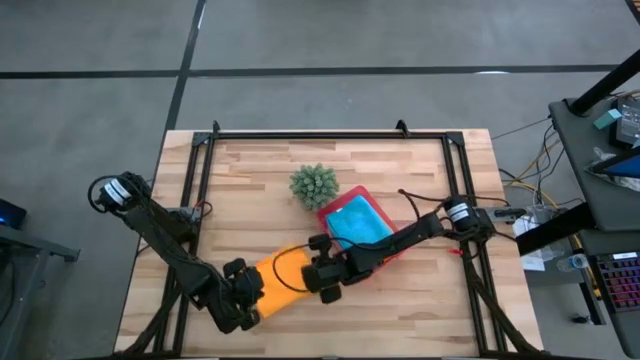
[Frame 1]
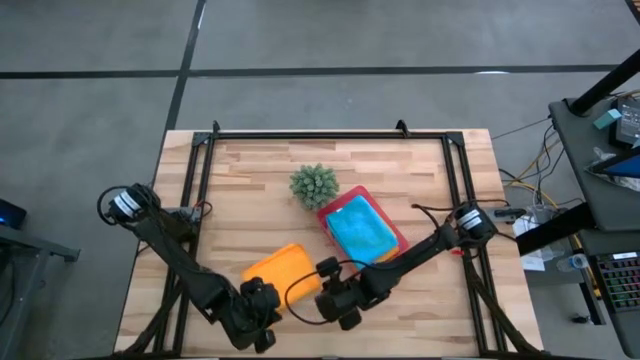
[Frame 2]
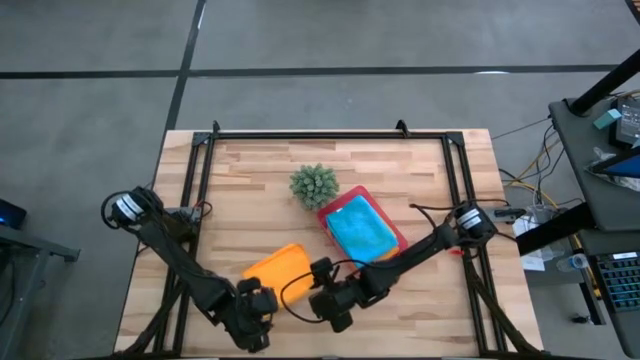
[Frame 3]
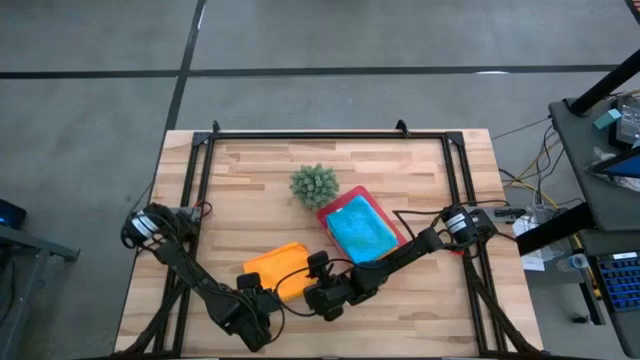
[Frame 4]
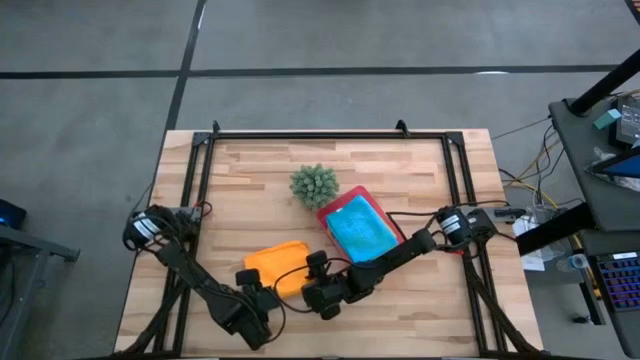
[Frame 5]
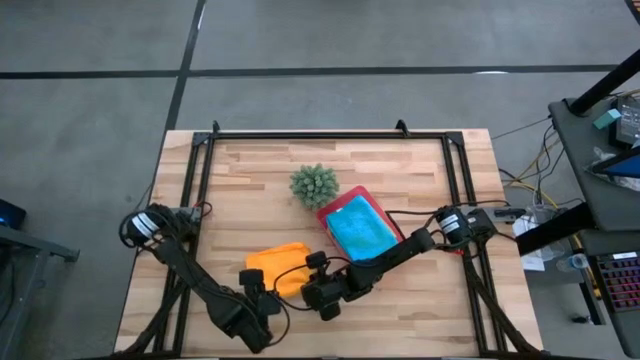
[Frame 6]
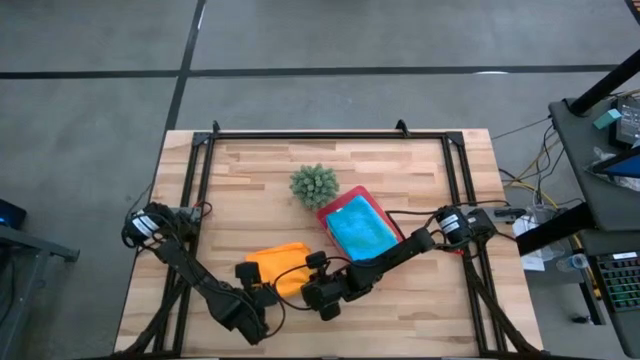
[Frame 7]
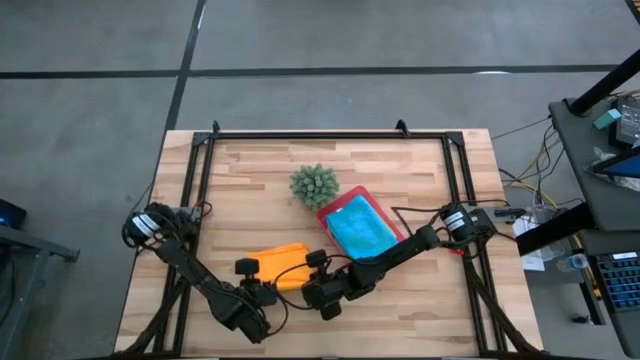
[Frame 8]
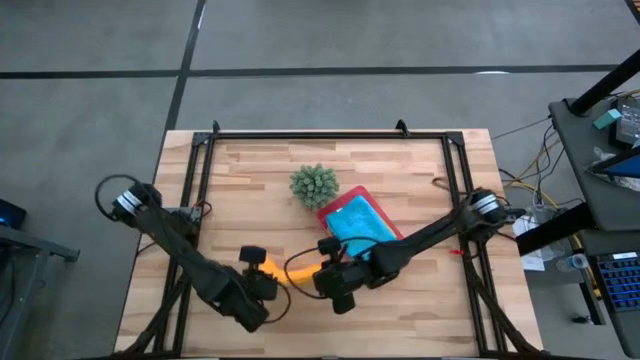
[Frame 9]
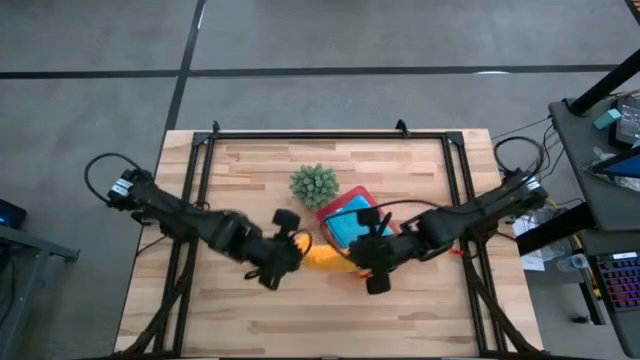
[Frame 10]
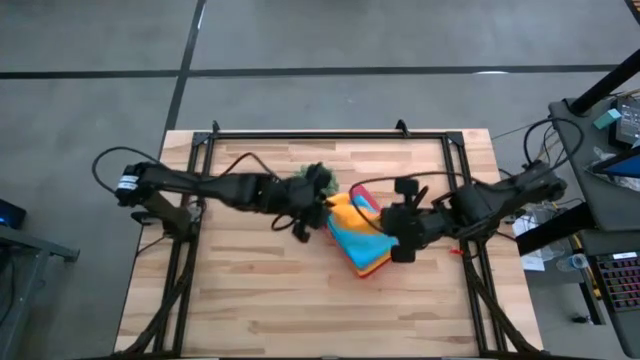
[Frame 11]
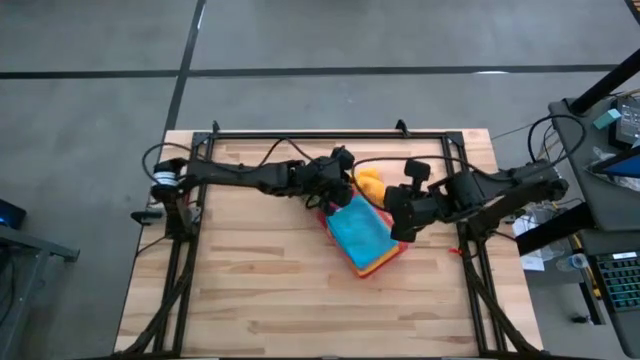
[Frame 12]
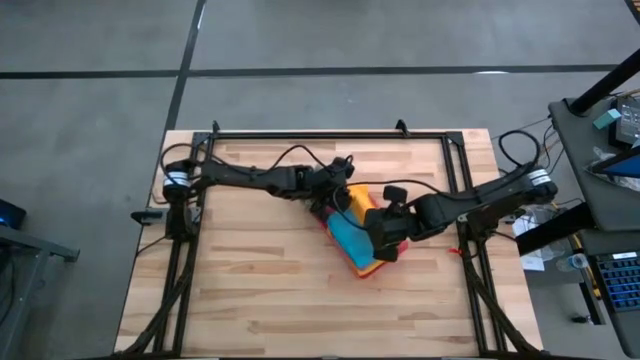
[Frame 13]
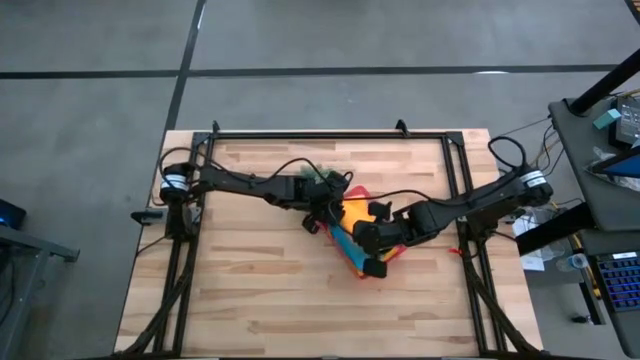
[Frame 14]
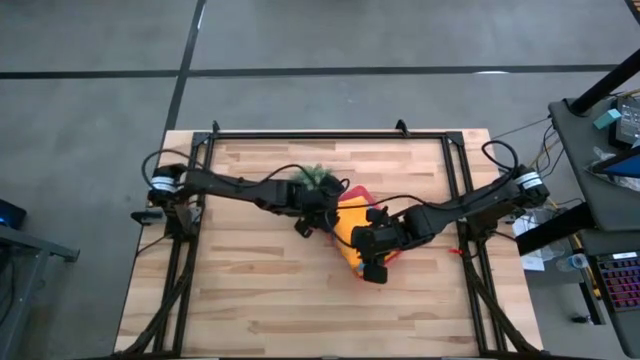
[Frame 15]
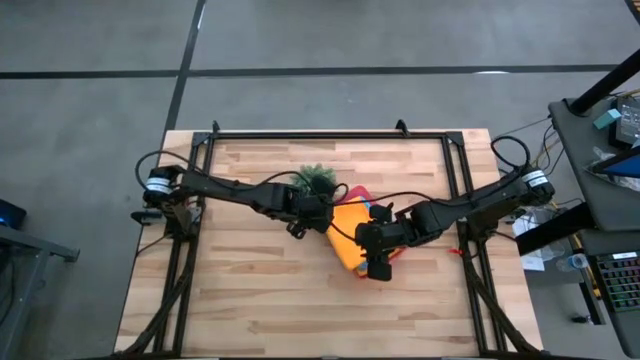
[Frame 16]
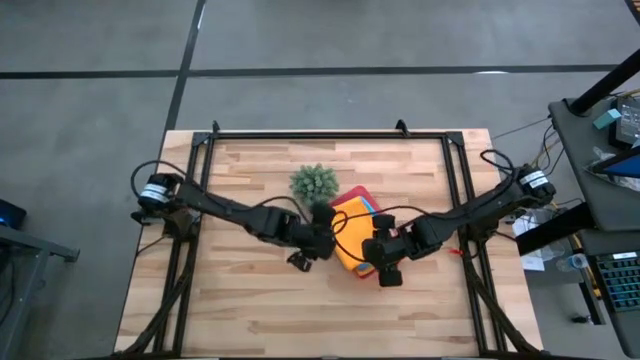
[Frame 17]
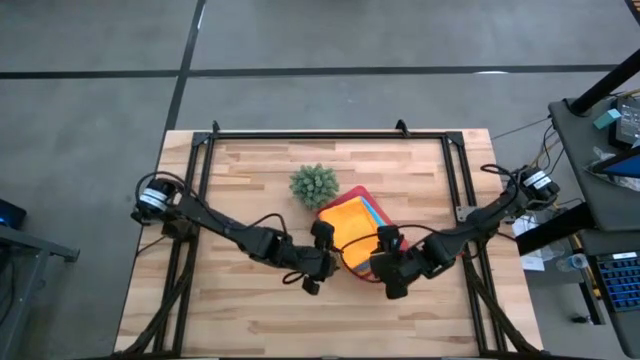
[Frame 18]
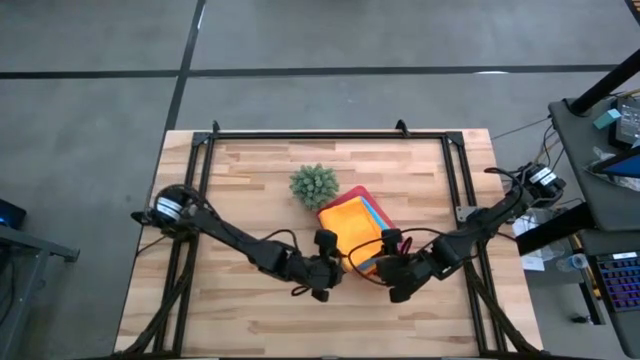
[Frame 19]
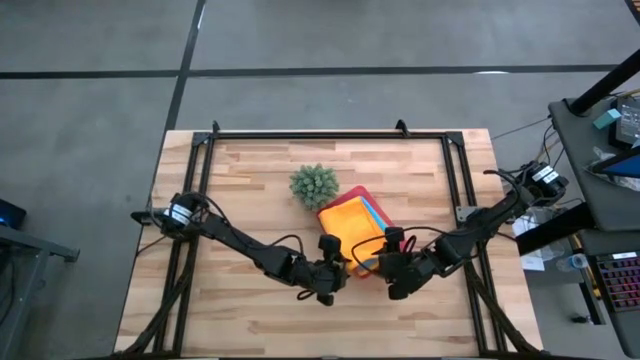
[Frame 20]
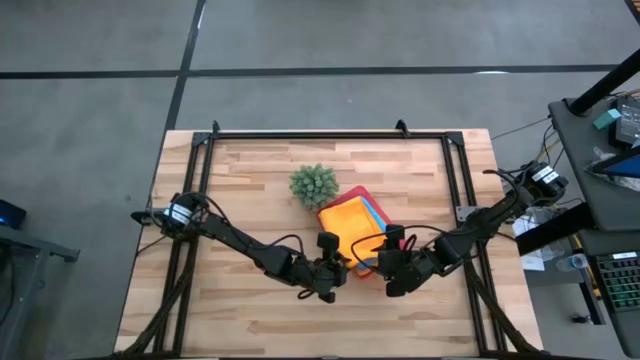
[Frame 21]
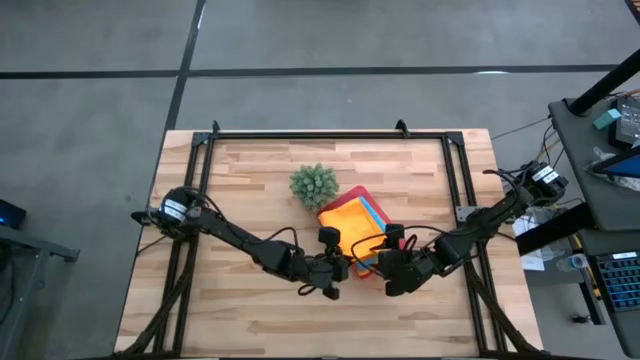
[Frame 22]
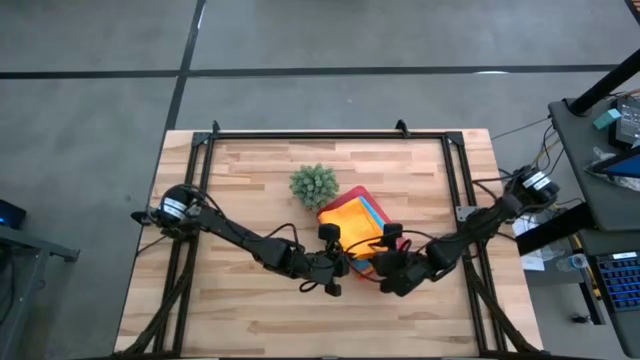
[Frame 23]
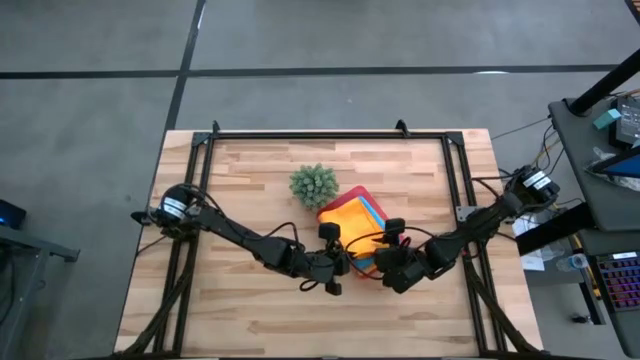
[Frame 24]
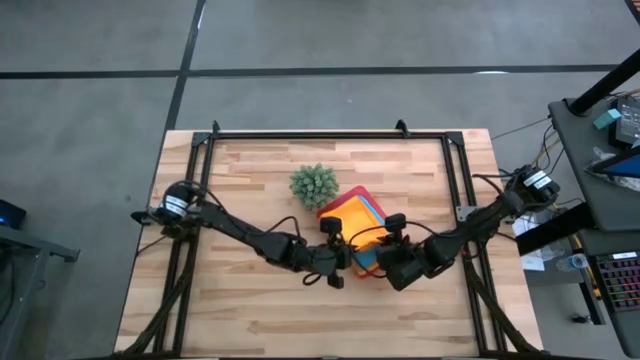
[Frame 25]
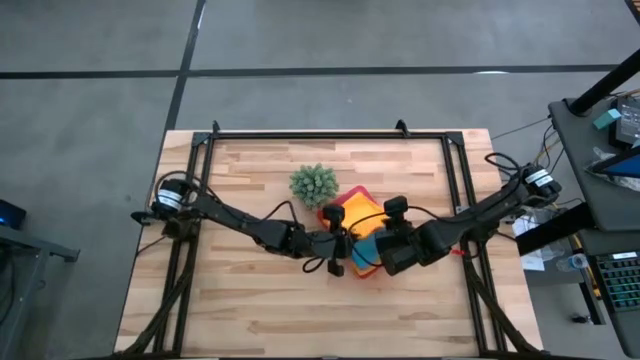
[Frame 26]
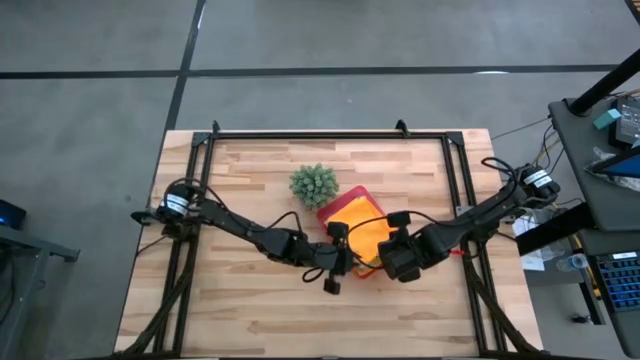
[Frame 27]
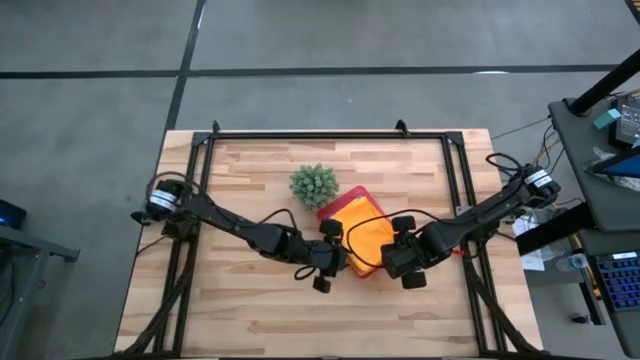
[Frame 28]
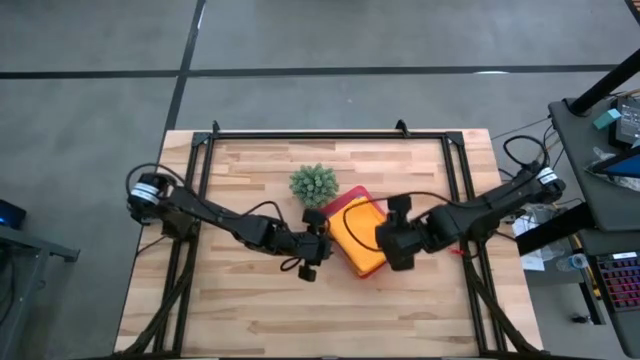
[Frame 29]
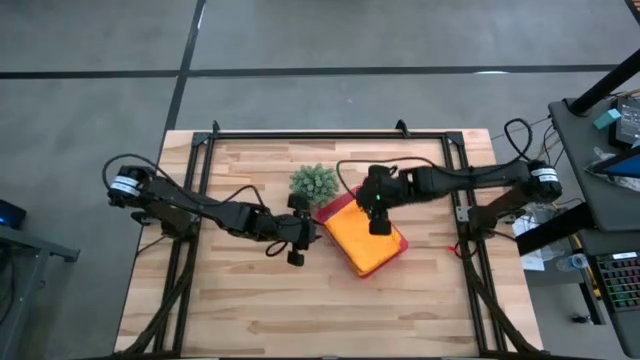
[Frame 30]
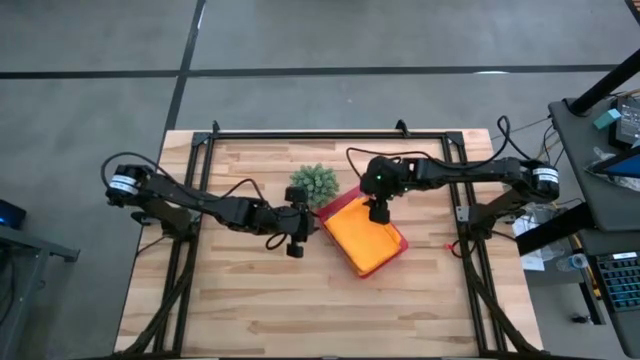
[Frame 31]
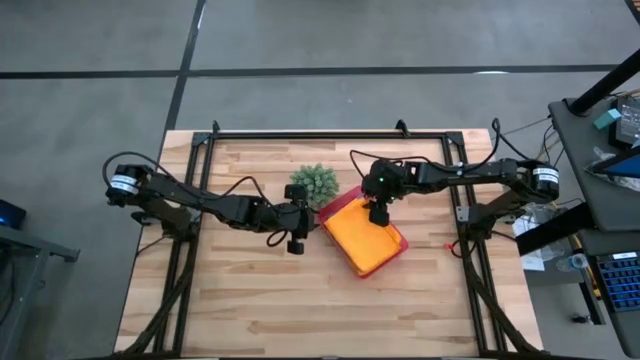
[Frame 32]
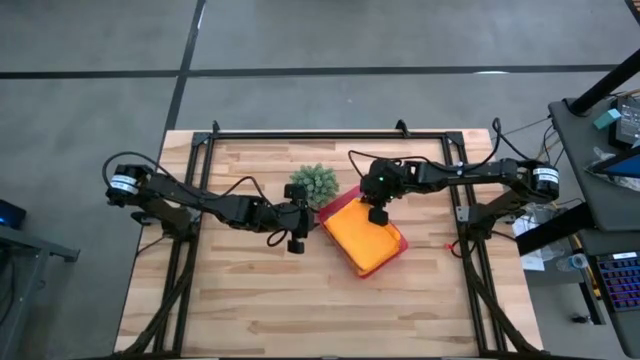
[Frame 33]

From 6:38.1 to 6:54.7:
Task: Fold microfiber towels
Put the orange microfiber cloth into the pink bin

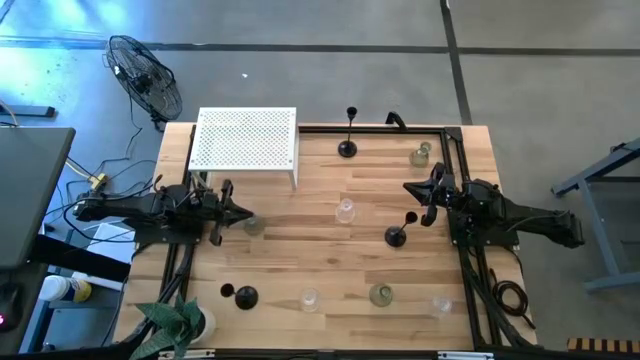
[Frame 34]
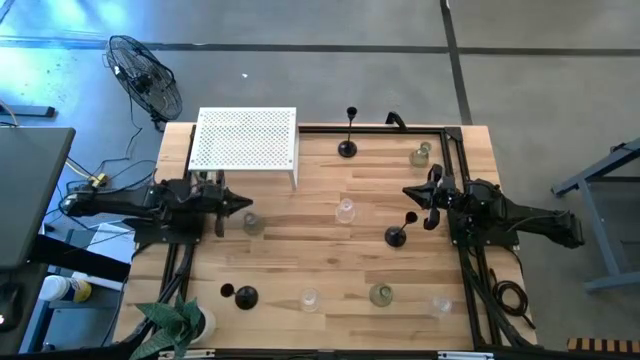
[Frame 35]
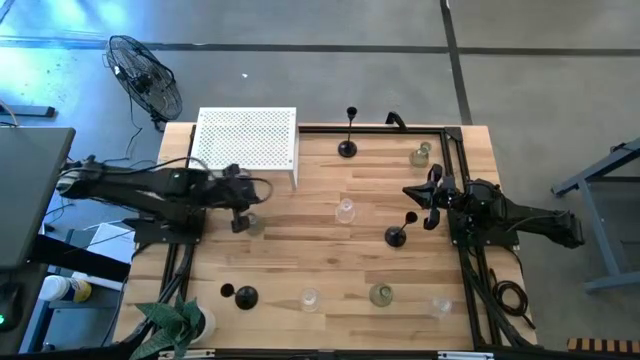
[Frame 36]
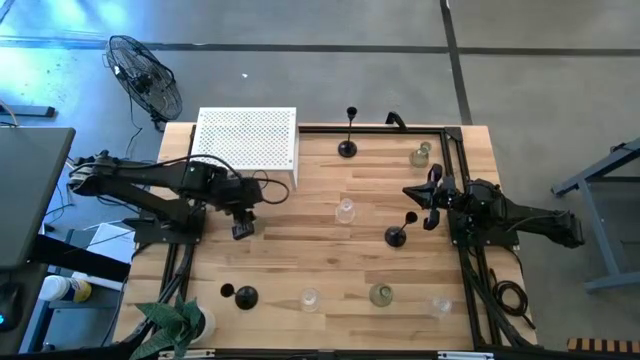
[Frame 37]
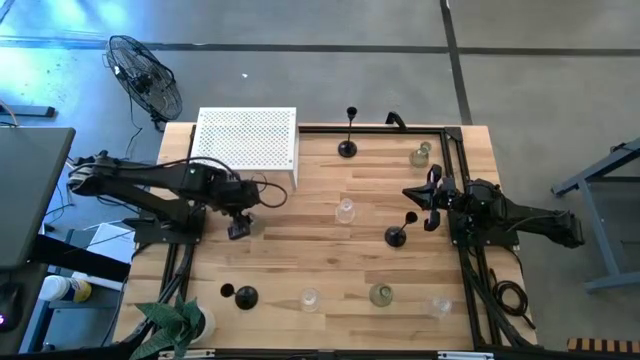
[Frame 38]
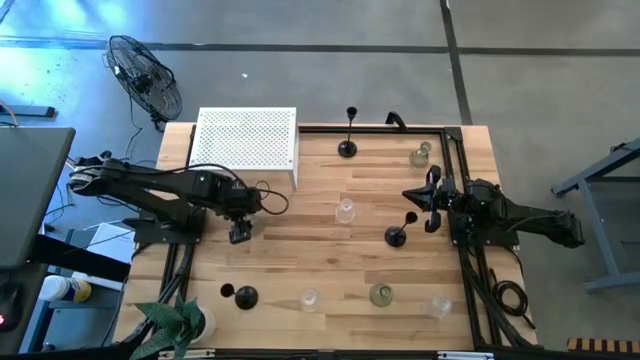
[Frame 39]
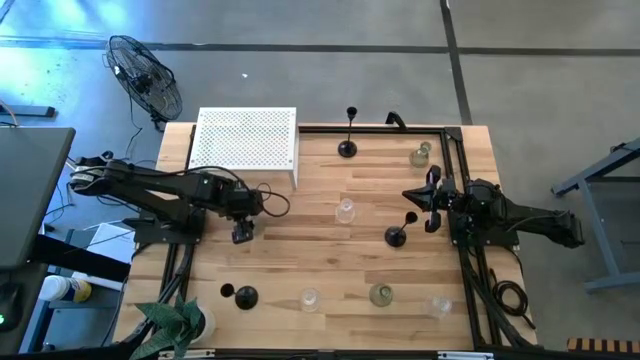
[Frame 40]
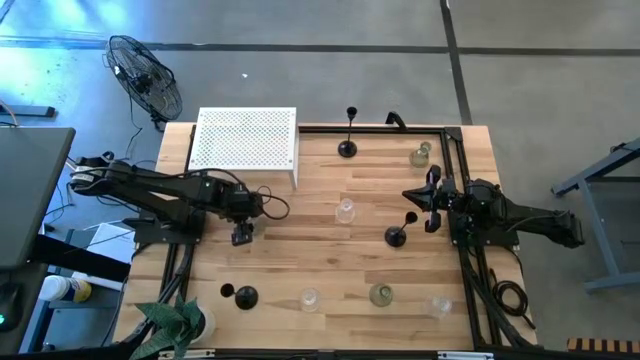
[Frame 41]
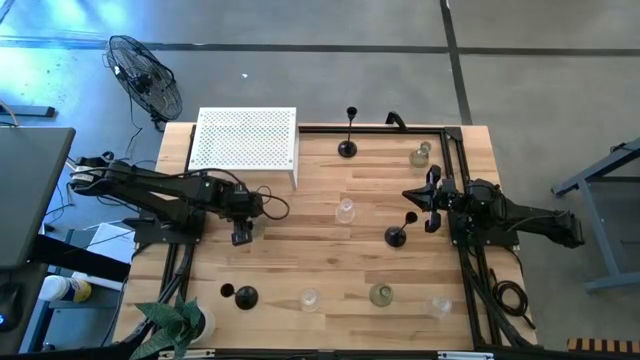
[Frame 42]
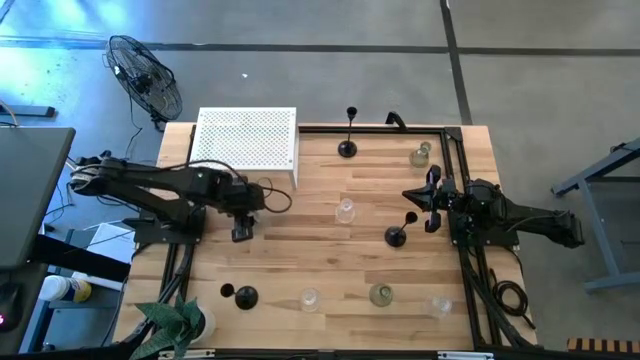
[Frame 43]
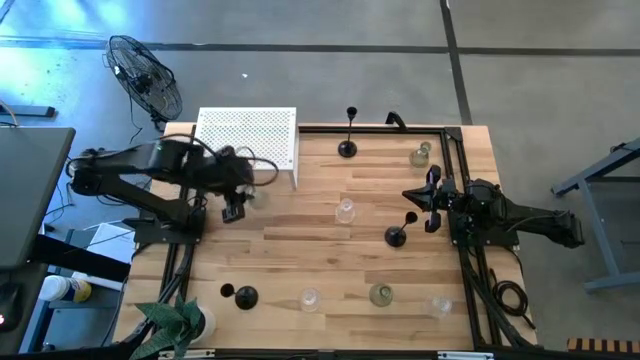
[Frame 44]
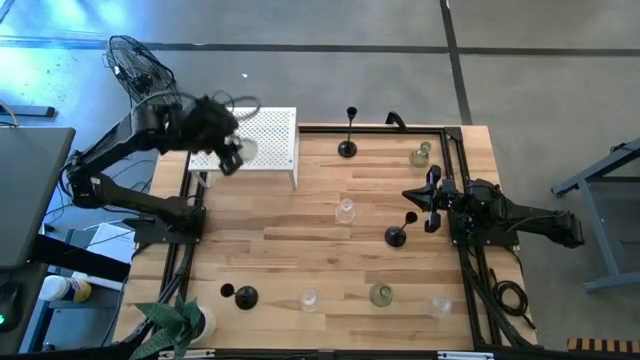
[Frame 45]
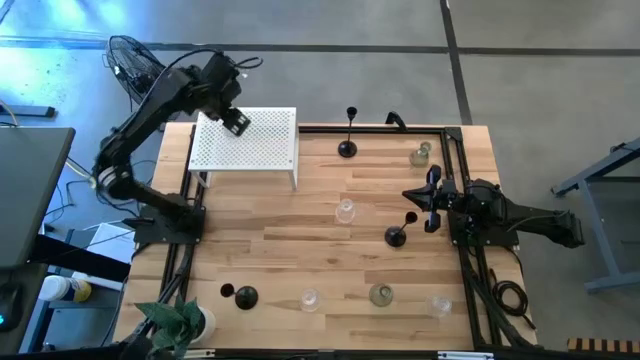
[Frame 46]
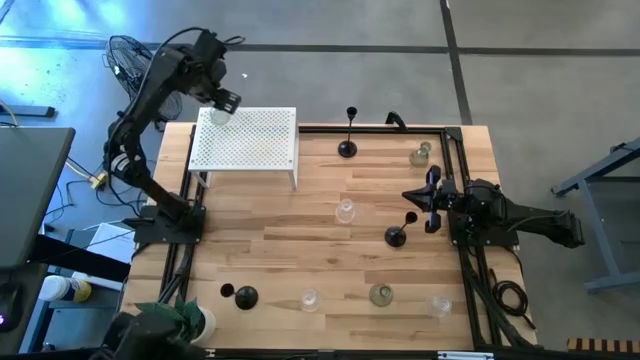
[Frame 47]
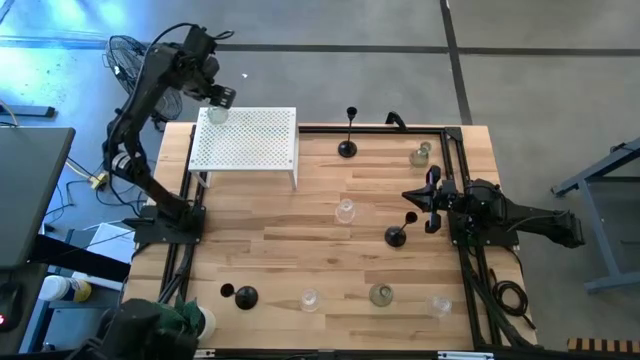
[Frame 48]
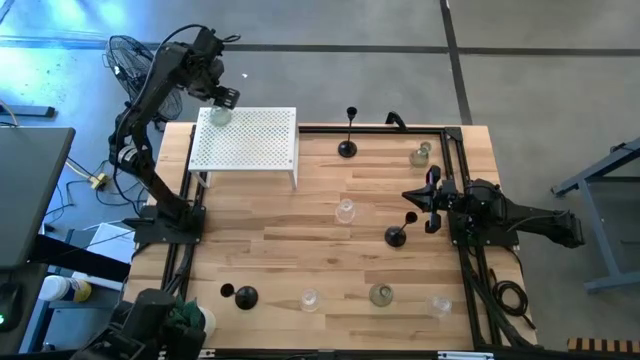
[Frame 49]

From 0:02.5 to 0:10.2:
Task: Pick & Place candle stick holders
Put the left green candle holder on the shelf
